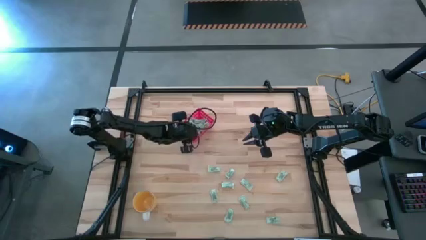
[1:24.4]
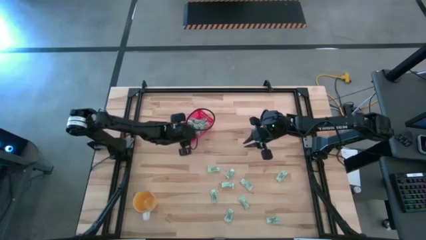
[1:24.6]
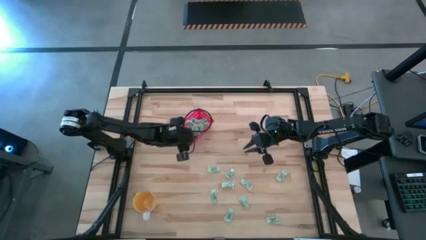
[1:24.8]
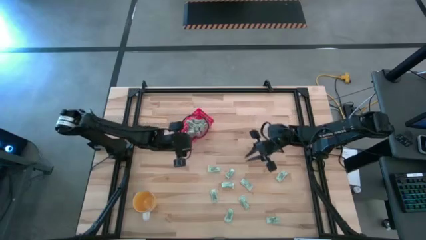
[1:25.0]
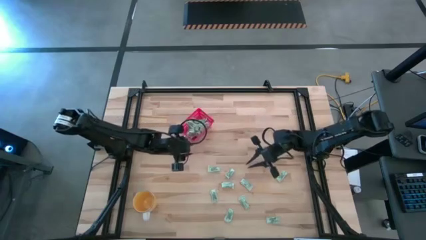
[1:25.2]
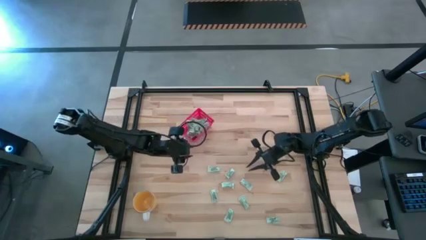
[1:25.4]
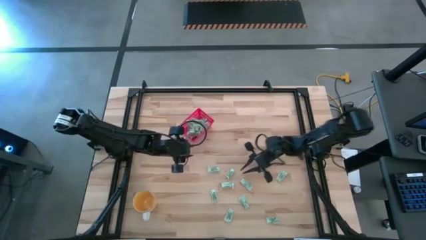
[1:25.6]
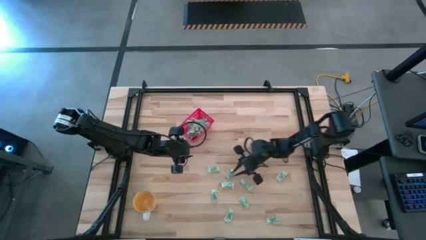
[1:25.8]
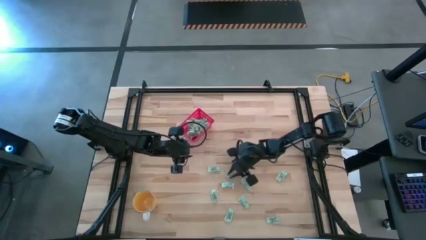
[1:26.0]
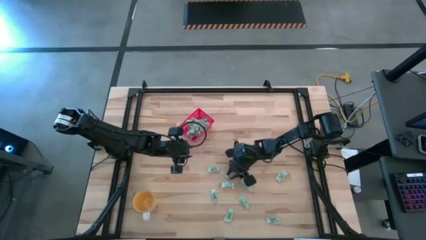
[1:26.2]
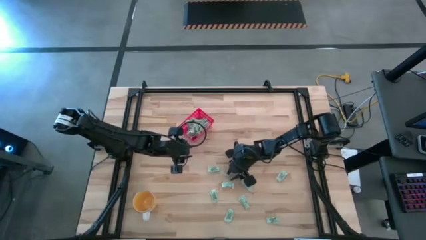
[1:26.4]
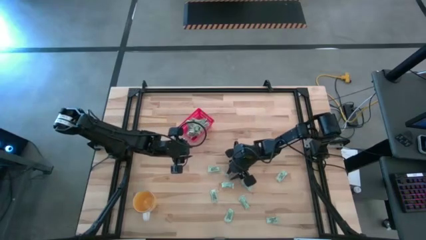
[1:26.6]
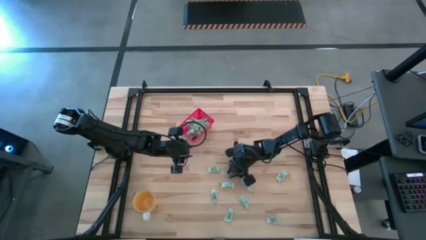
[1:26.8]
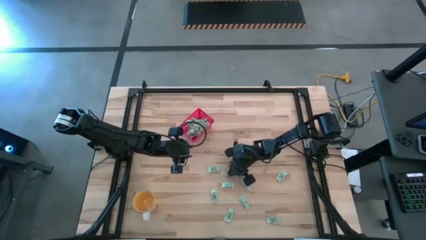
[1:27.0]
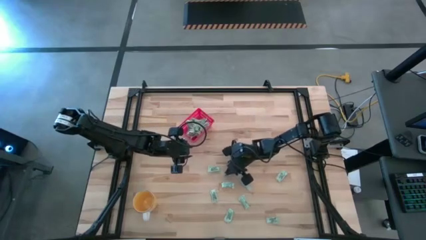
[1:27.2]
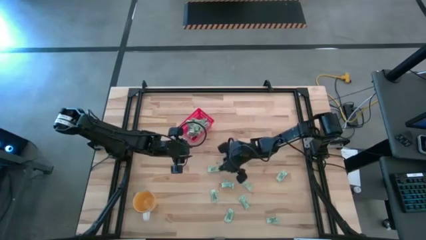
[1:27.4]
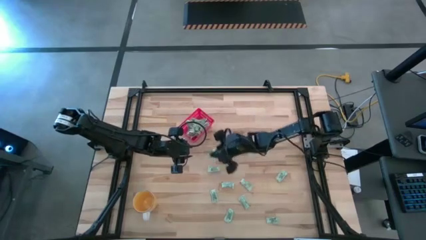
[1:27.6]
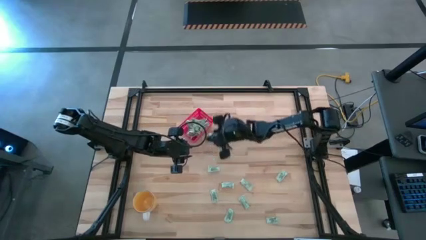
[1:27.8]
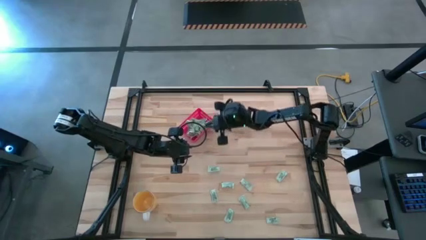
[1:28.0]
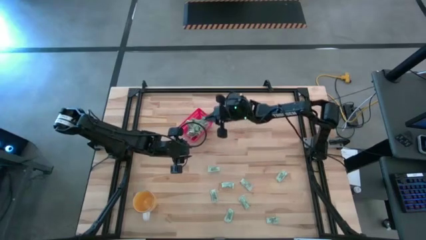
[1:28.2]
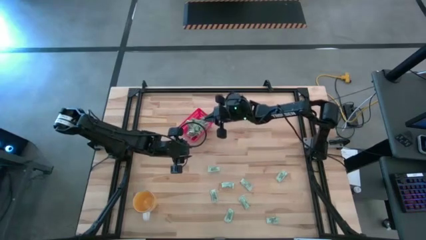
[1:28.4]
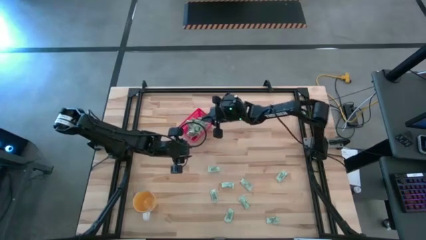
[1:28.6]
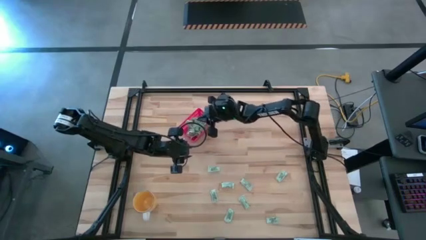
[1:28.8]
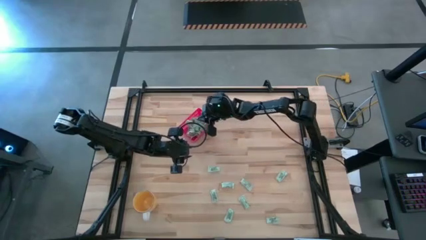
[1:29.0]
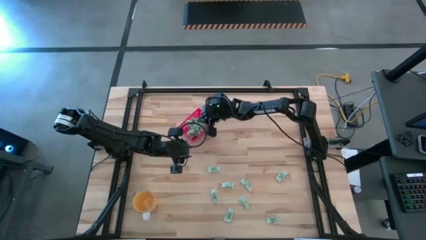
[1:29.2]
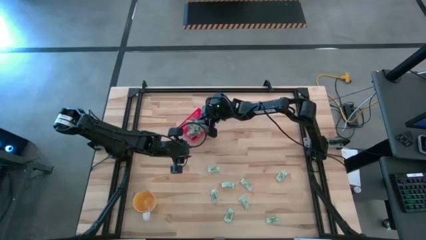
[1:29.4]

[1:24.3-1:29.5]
Task: Pick and place Stevia / Truvia into bins
Put the white stevia packet into the red bin

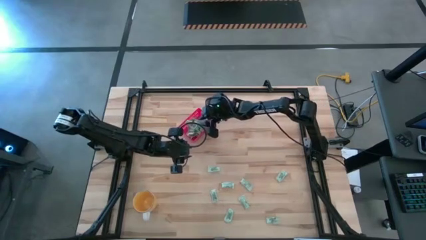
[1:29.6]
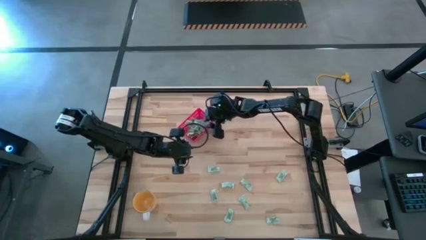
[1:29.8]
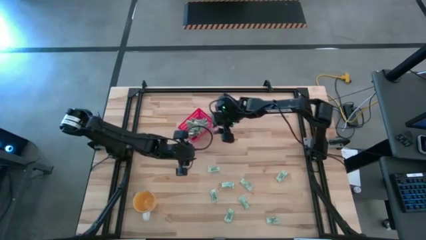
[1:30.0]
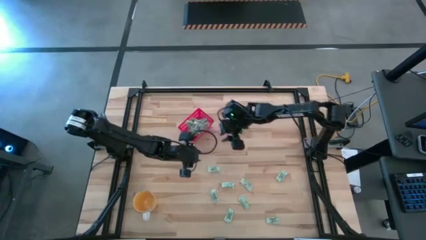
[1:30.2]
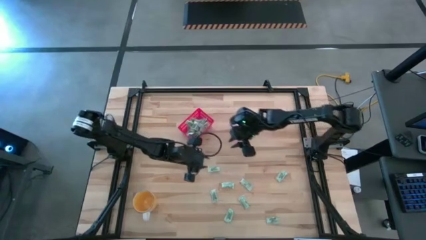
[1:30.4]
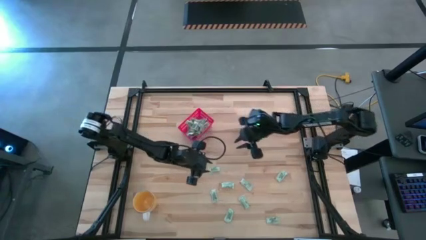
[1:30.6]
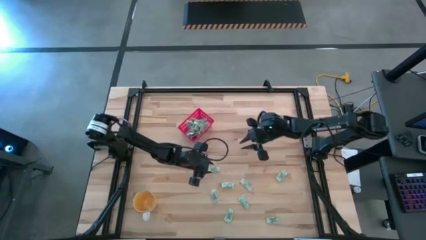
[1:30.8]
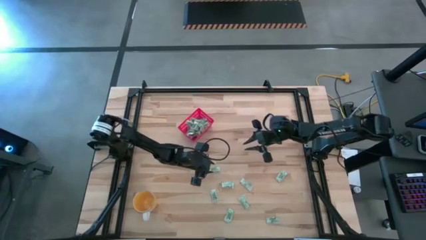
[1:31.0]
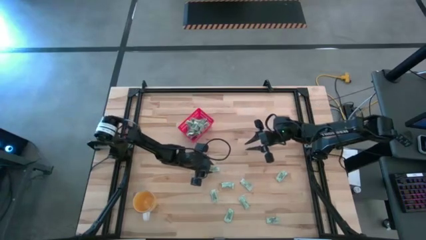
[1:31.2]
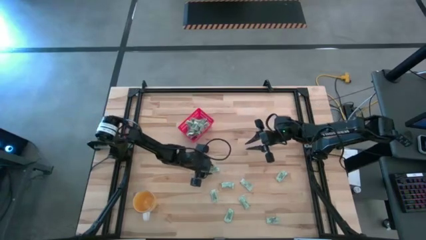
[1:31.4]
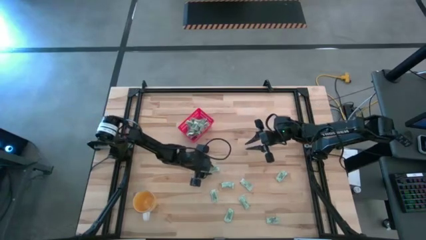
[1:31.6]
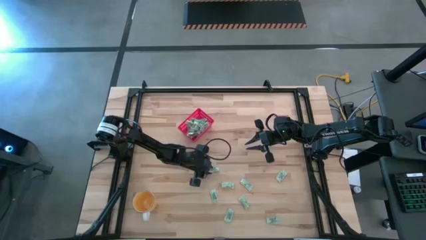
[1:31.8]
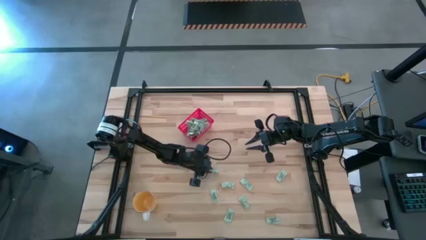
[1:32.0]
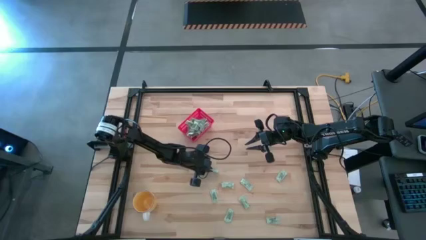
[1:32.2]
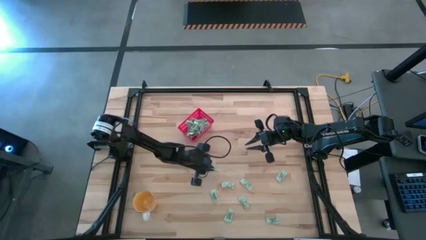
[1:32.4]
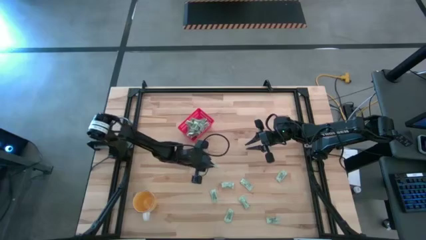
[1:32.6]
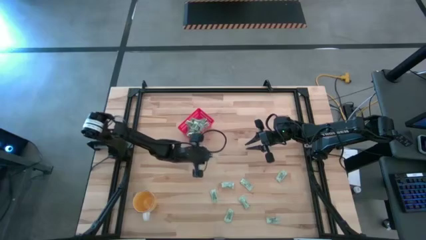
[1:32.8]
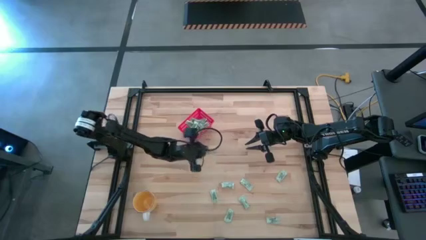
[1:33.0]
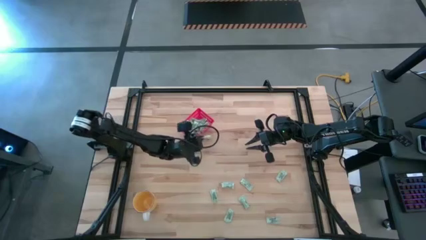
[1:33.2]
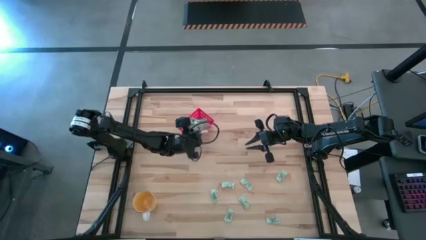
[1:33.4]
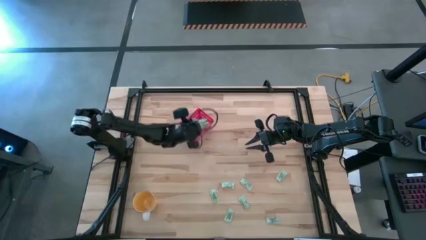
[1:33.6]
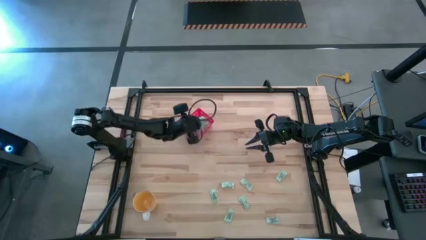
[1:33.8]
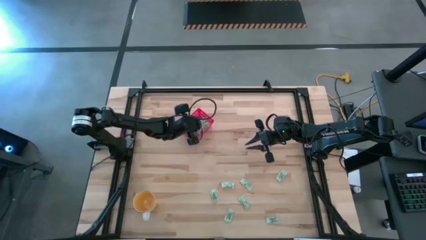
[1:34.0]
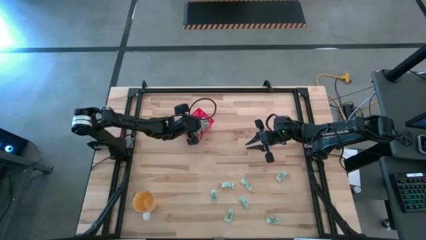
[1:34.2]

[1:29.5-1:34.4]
Put the white stevia packet into the red bin

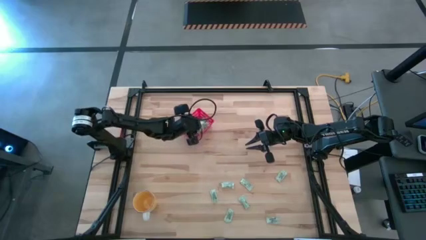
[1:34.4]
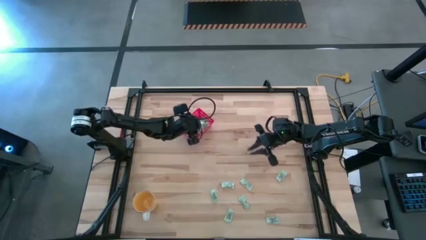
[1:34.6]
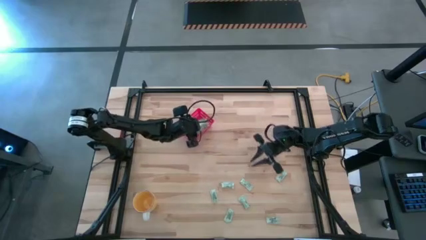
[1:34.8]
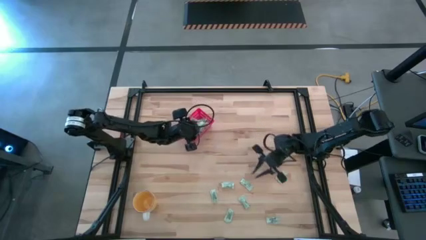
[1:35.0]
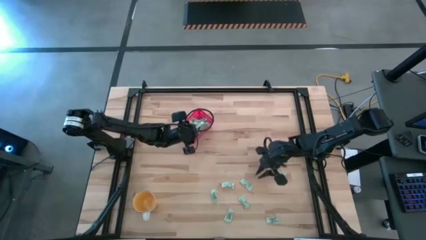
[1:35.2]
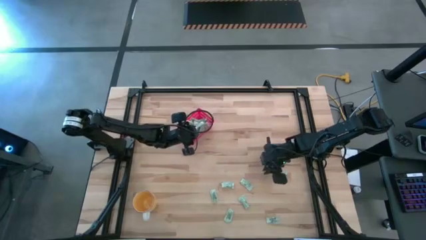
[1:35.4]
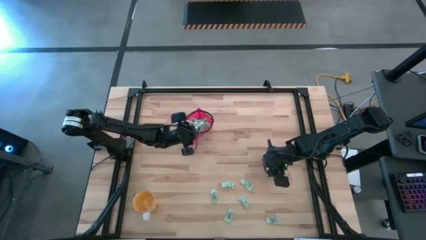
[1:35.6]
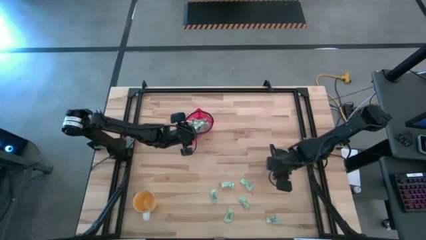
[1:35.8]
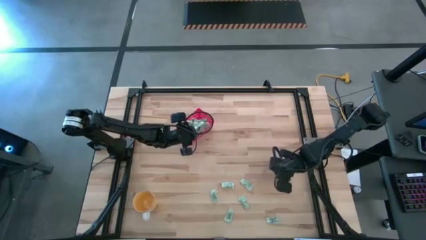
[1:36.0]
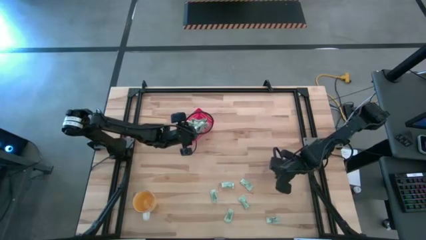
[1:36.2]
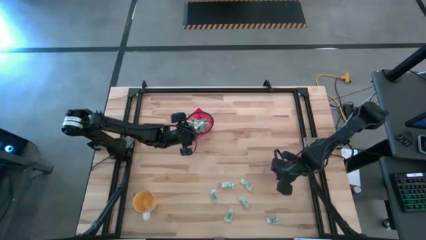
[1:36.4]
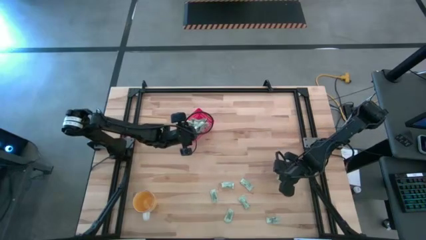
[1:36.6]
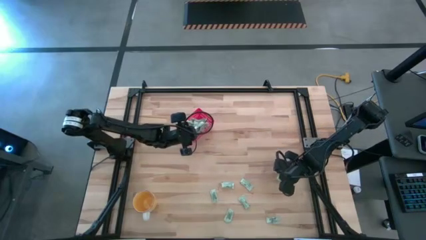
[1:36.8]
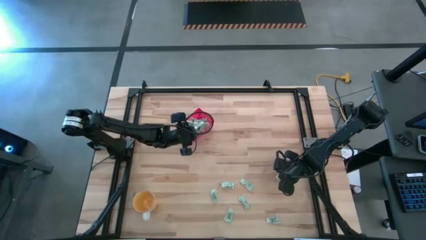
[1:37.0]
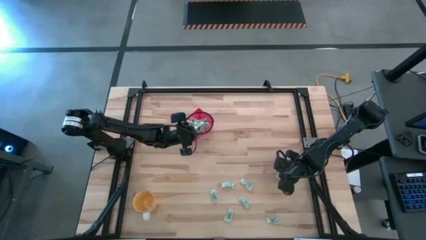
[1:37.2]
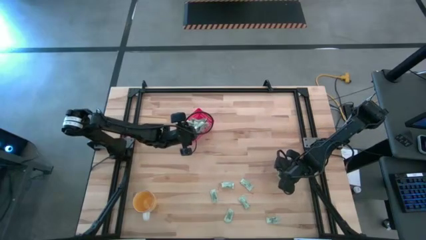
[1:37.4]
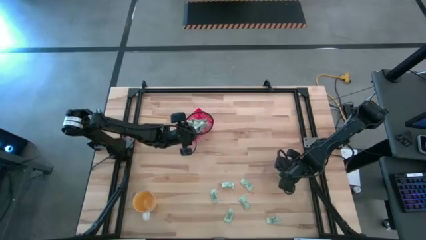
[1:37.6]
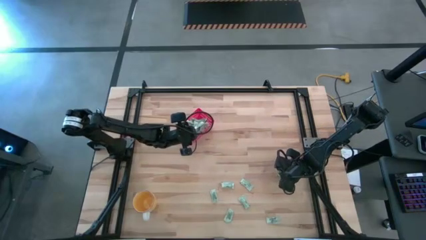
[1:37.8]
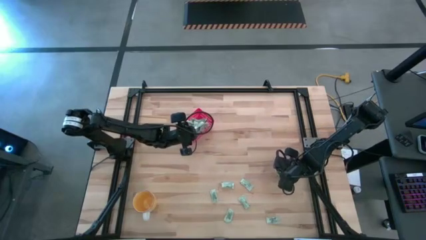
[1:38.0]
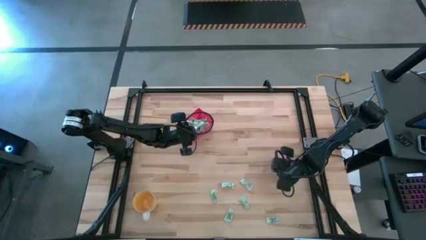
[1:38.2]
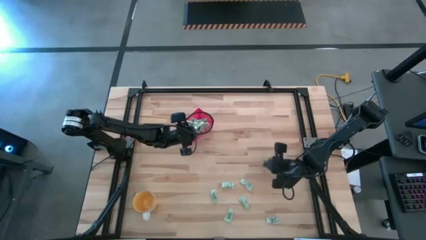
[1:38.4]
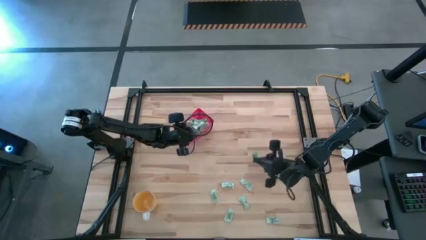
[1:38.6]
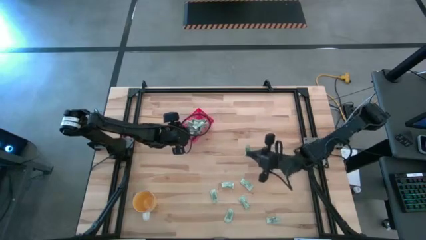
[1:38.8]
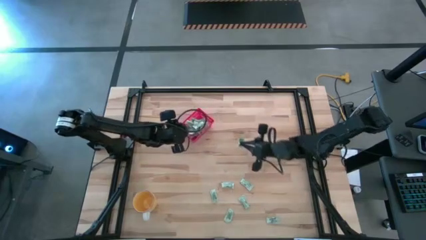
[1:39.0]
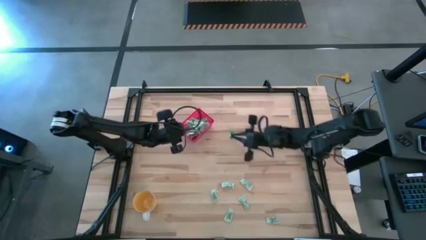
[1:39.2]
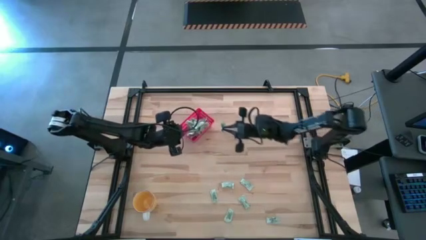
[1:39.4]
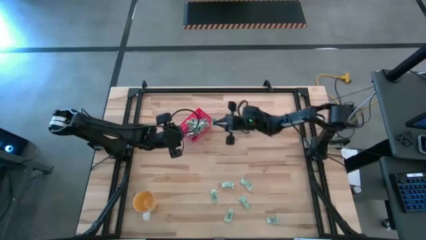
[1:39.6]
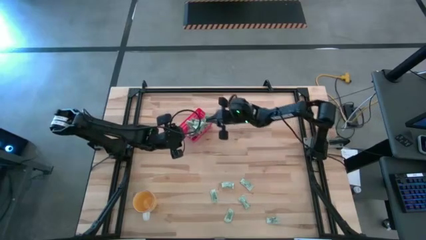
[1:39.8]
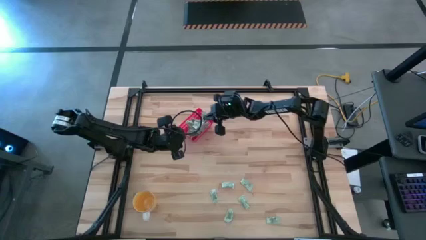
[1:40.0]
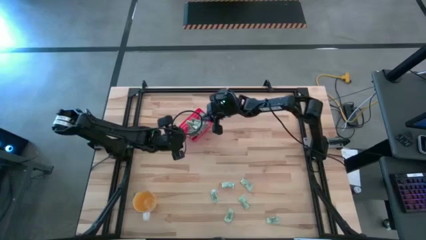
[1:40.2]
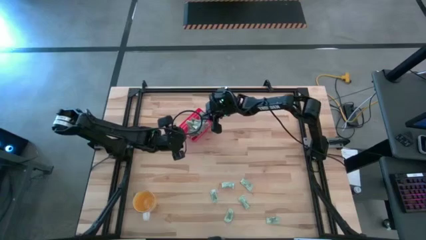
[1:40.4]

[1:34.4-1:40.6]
Put the white stevia packet into the red bin
